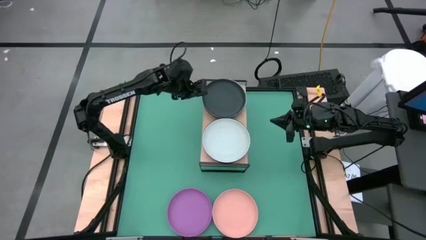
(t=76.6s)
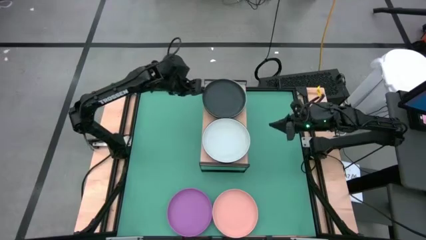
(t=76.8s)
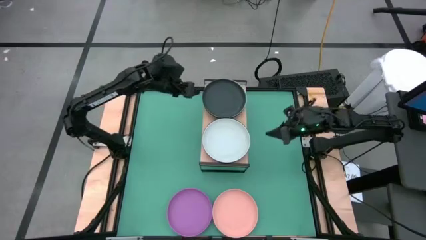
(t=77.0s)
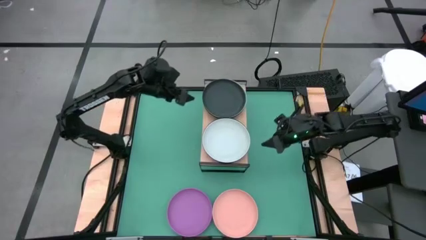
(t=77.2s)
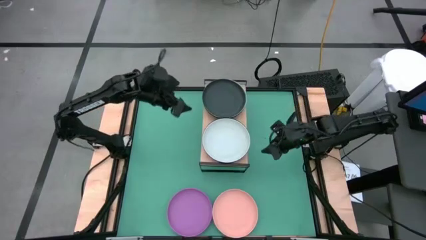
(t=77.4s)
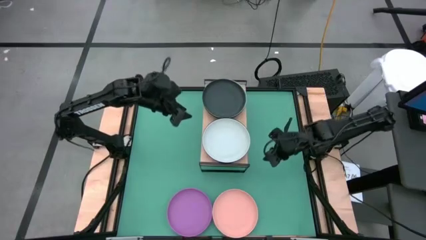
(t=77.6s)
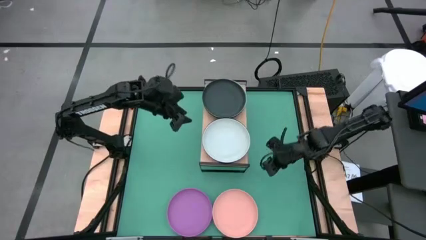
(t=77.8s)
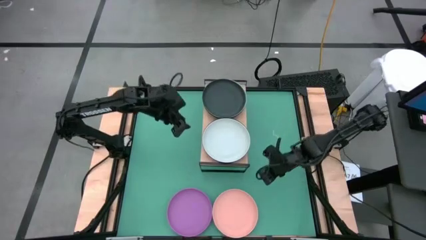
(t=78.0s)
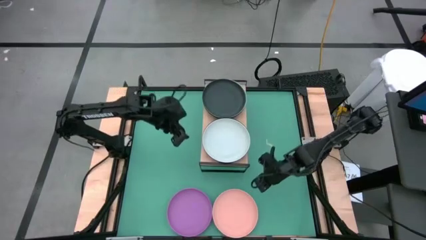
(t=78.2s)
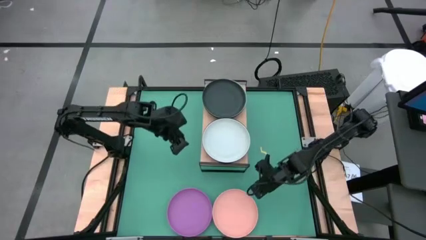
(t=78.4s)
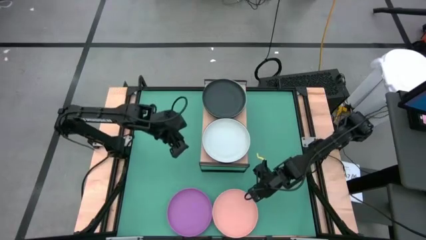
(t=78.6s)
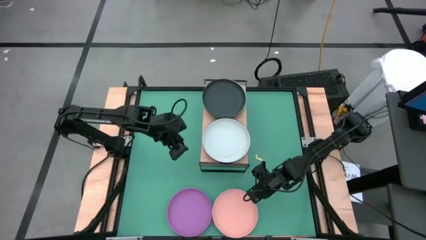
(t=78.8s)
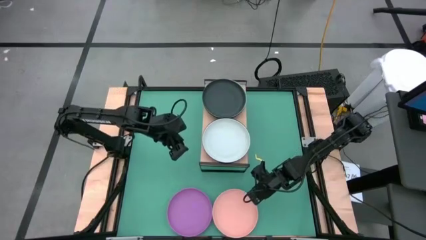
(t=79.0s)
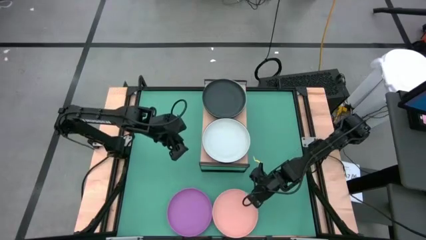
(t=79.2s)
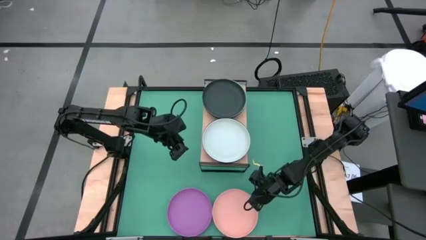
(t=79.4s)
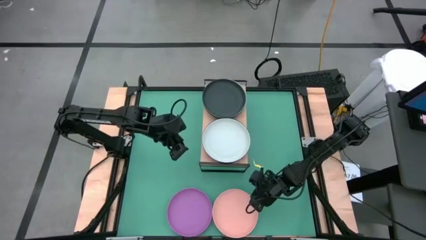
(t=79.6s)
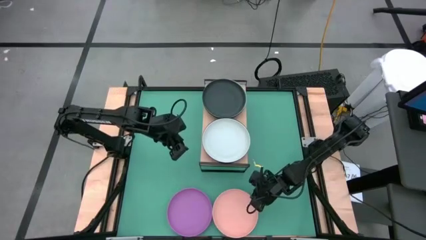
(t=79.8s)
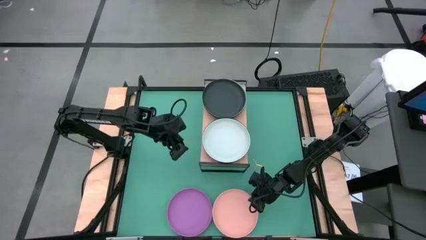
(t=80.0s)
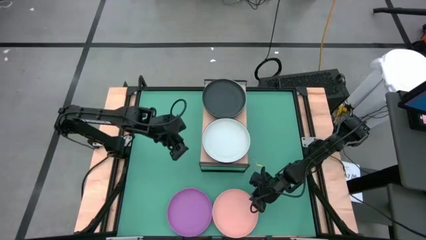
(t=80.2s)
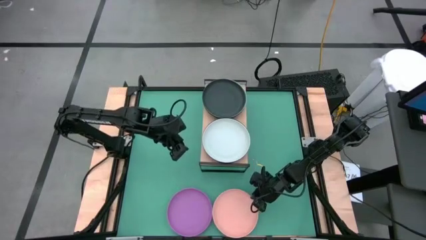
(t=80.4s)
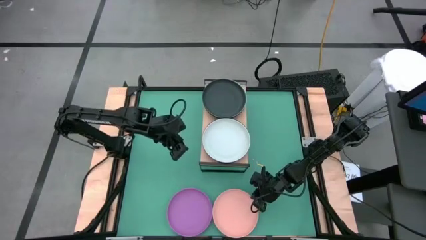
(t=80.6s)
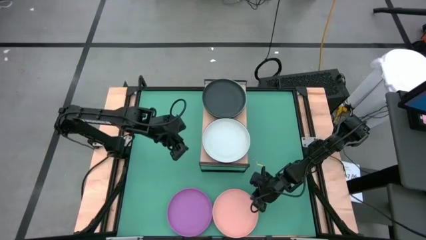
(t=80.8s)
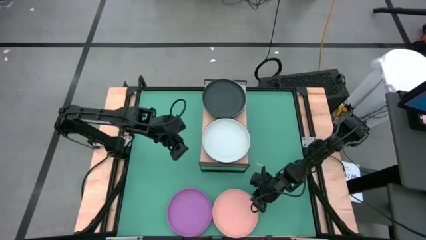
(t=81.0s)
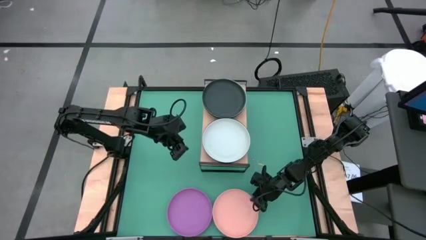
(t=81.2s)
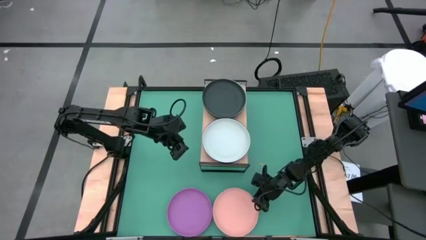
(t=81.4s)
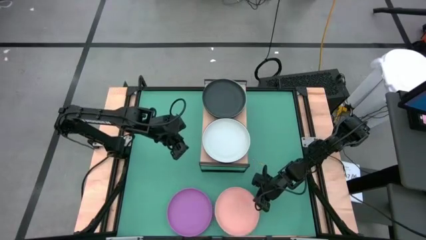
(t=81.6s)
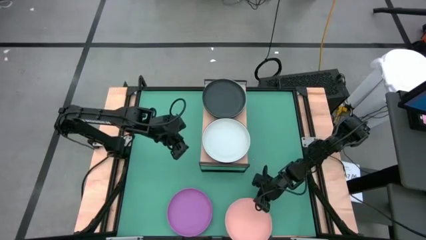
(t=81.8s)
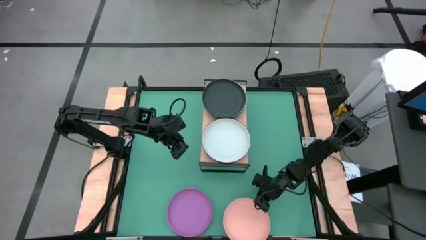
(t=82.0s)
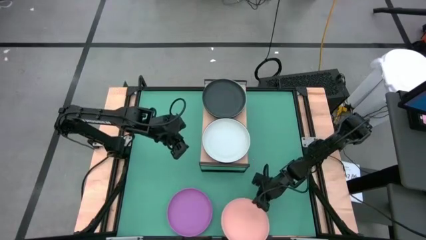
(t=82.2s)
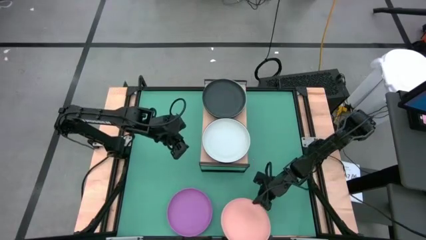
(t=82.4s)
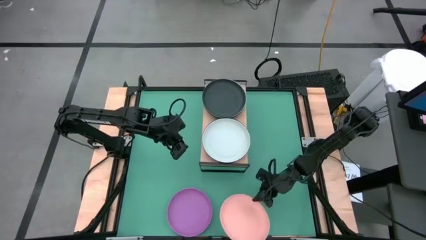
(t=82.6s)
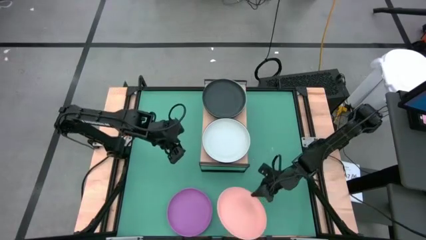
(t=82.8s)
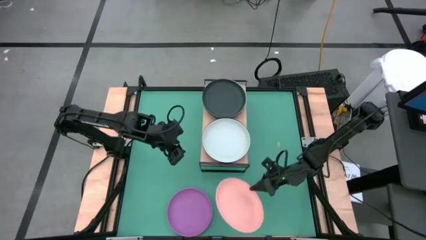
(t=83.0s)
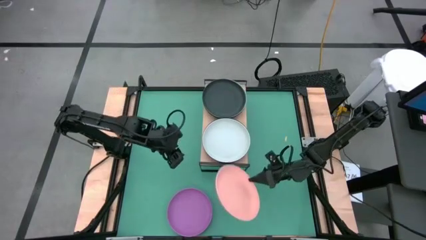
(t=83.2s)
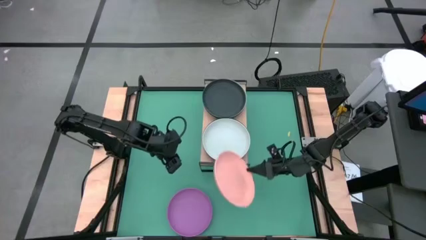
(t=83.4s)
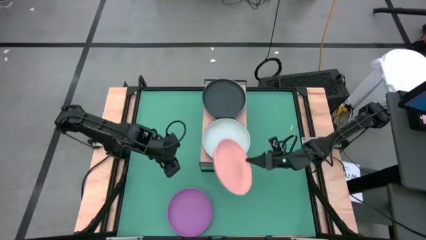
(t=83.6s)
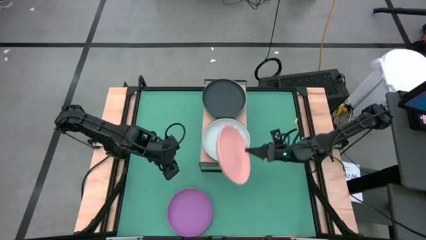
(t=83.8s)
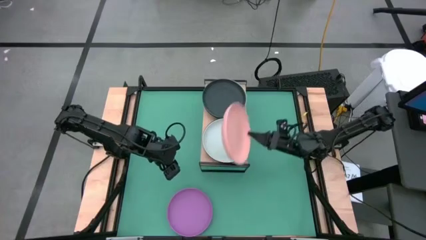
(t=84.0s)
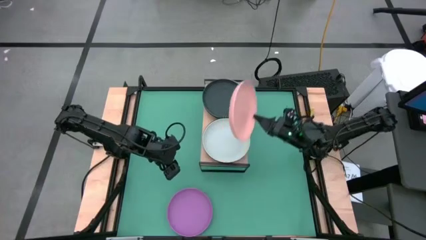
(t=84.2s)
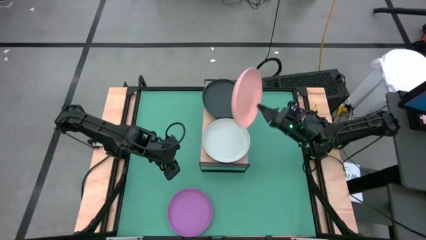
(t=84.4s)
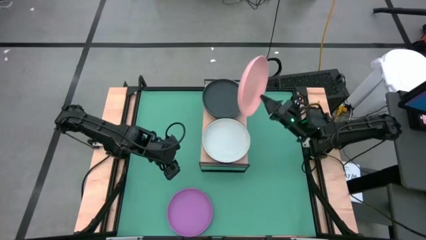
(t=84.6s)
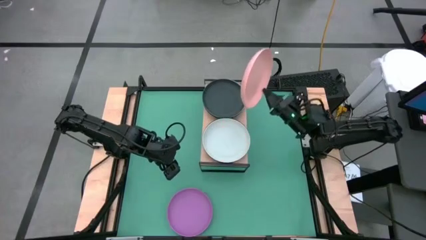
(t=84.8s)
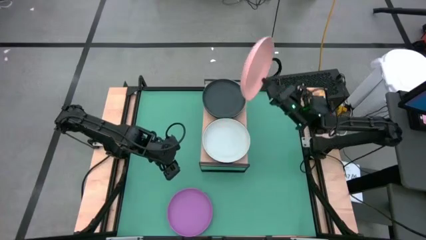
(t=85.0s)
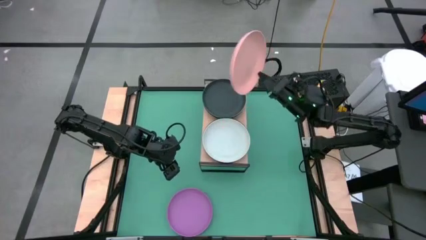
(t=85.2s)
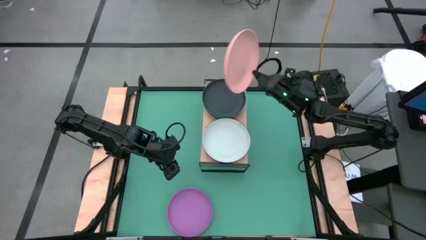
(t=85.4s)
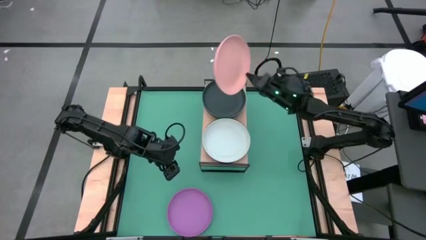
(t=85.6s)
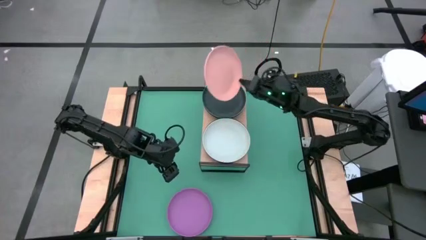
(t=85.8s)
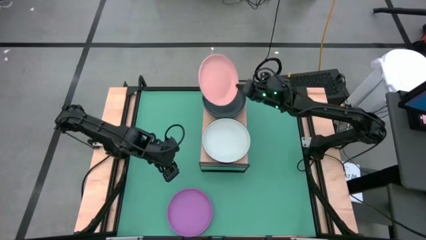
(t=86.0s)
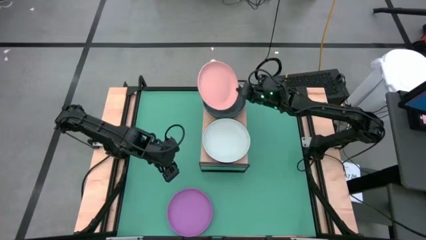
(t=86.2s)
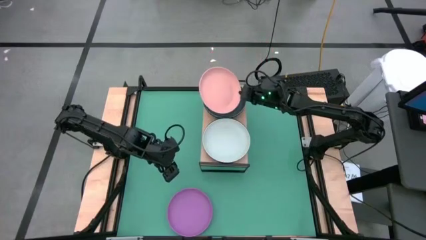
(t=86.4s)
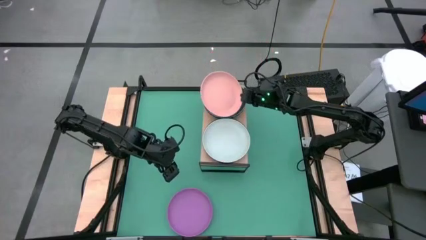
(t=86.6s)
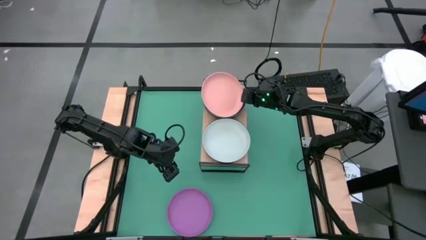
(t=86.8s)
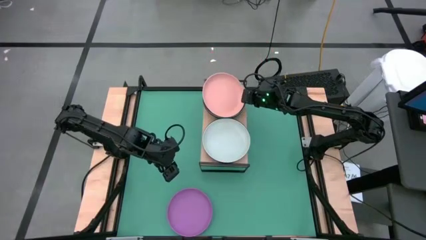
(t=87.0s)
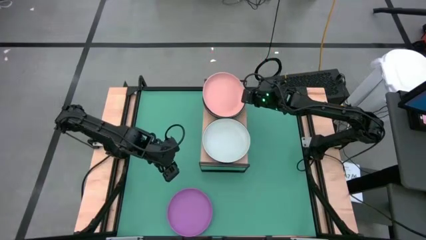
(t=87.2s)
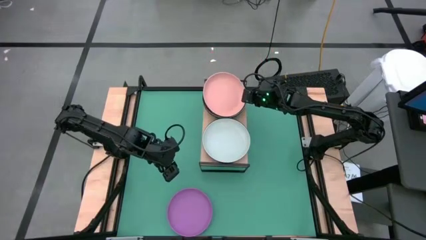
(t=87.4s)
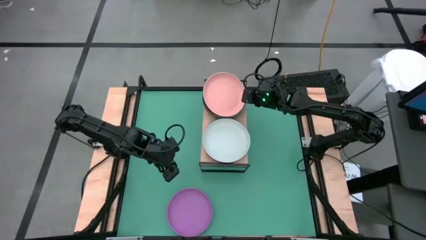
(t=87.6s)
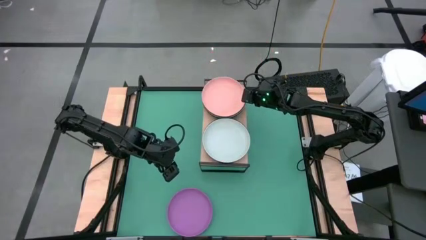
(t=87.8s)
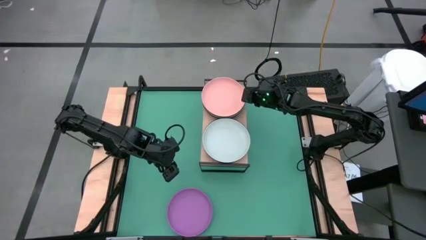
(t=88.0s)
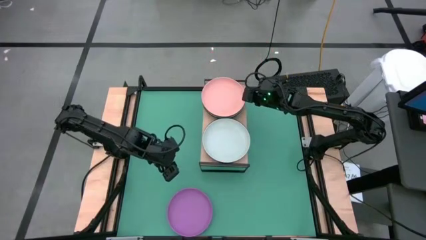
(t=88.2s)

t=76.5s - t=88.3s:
Task: Place and stack plates onto a shelf
Stack the pink plate on top of the black plate

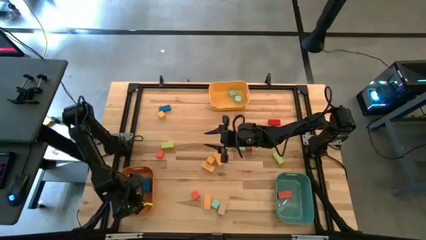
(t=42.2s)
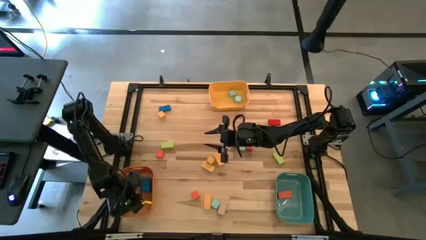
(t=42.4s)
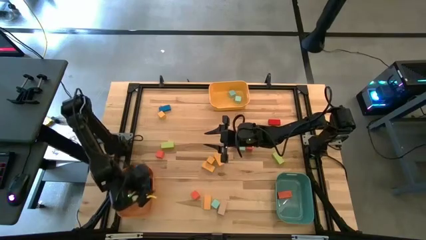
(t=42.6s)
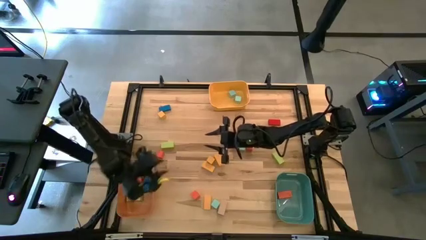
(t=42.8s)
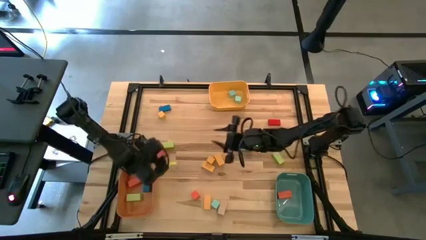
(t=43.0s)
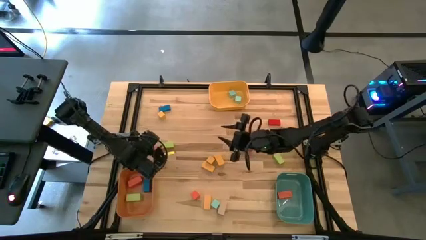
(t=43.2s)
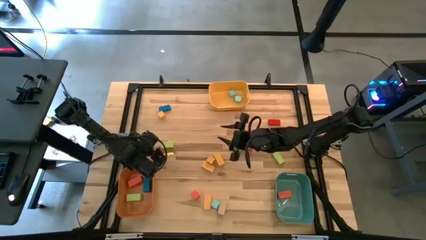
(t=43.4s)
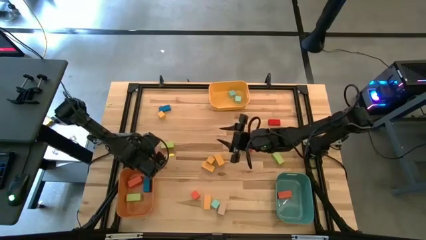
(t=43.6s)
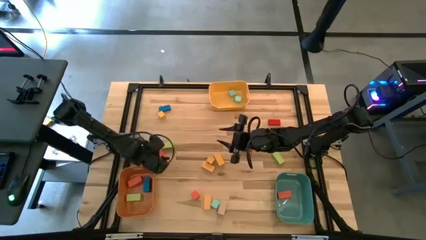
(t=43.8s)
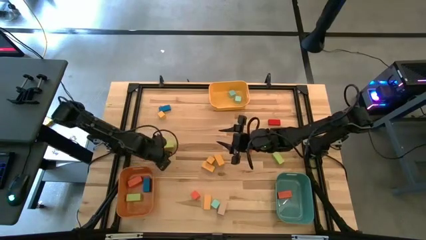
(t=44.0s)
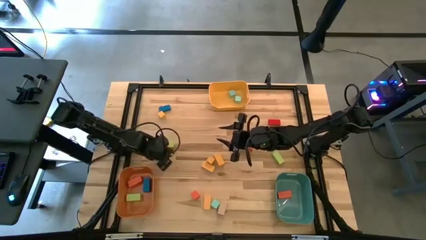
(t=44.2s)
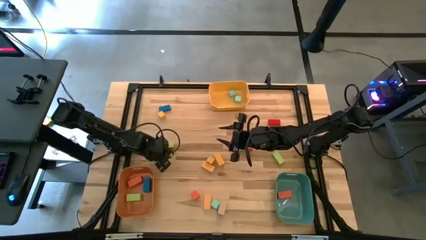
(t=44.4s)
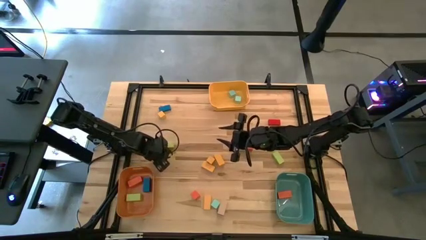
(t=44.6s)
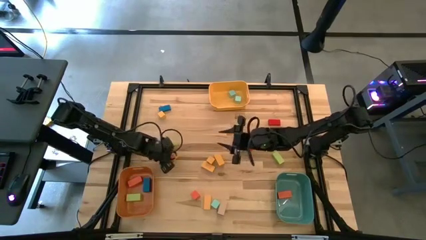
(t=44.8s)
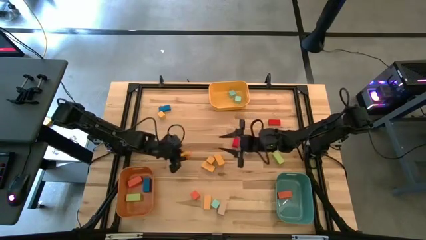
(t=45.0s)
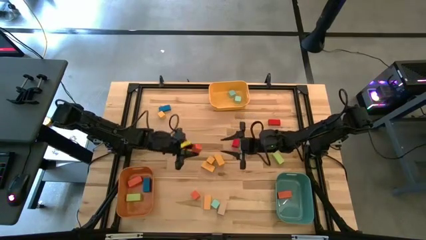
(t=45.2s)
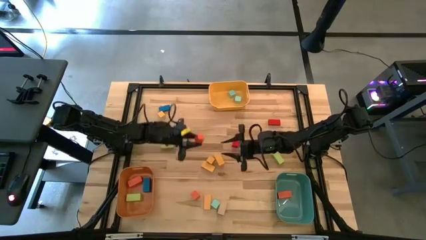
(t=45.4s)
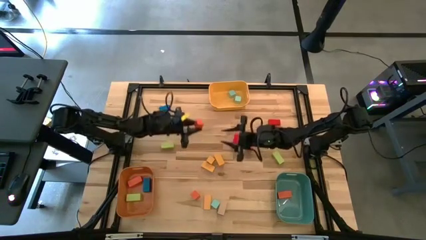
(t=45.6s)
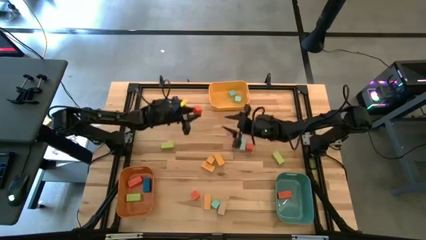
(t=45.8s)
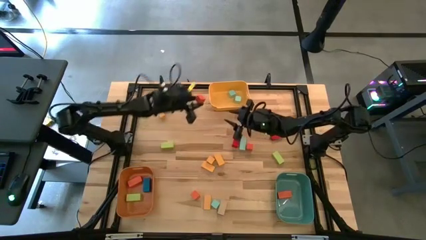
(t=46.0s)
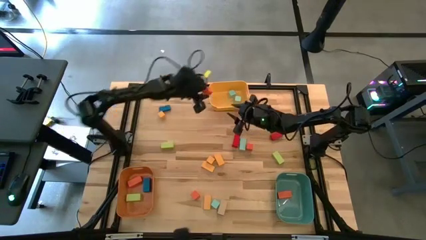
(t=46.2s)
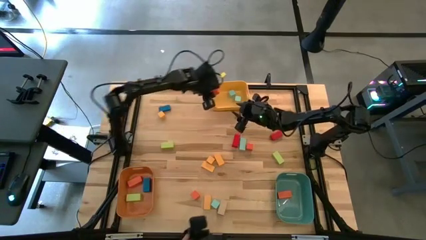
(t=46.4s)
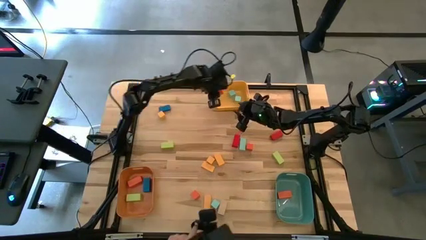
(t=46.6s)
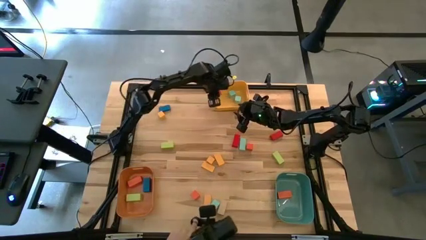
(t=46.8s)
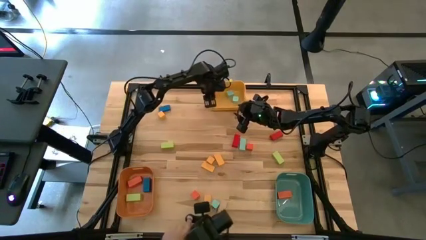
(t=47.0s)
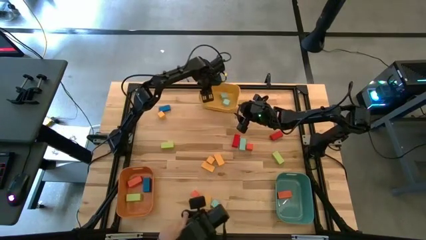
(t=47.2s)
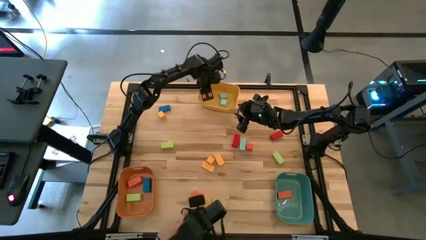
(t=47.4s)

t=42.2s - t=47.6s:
Task: Sort blocks by size
Put the small orange block into the yellow bin

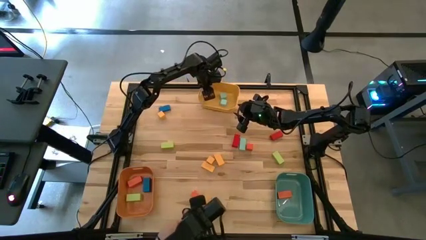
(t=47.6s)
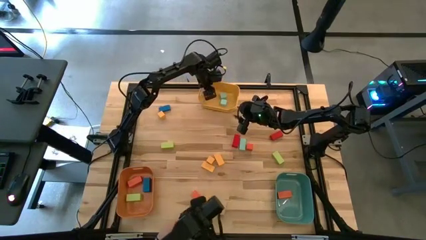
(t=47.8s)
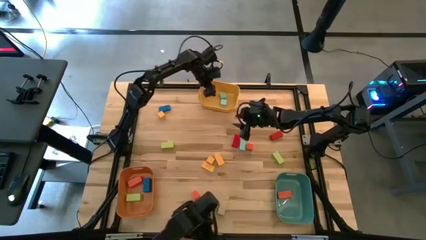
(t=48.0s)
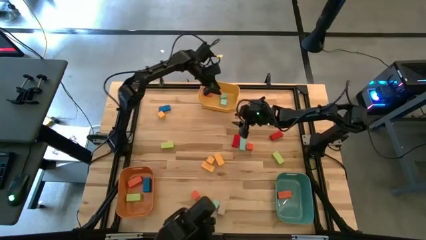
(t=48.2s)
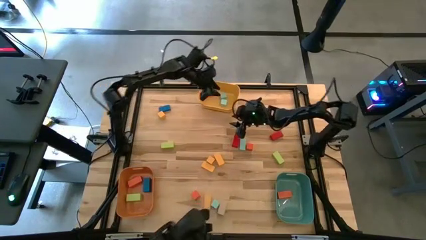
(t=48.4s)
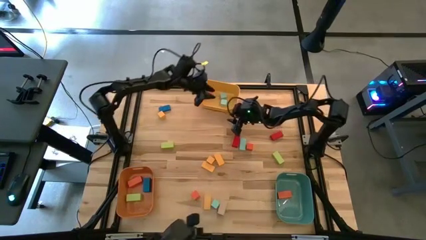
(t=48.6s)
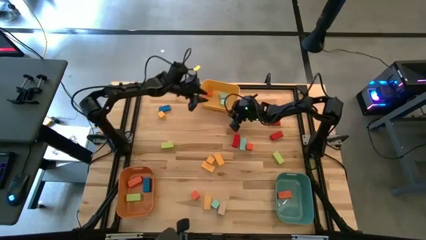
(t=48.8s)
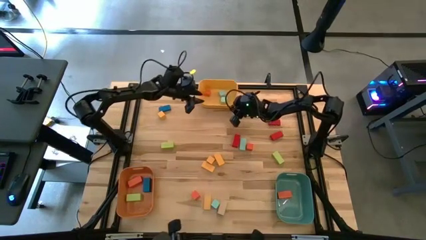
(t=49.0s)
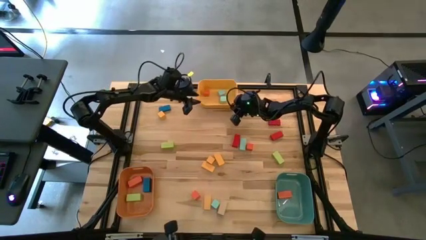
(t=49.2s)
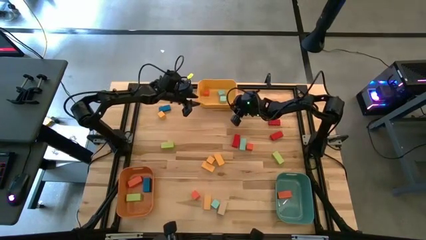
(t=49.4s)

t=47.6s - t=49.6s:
Adjust the yellow bin
